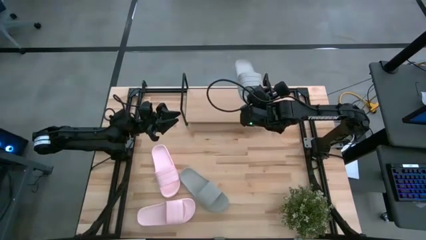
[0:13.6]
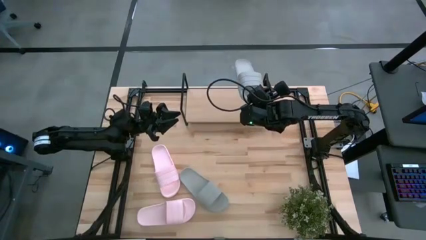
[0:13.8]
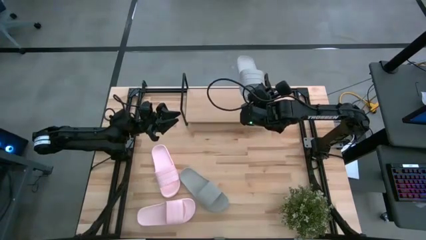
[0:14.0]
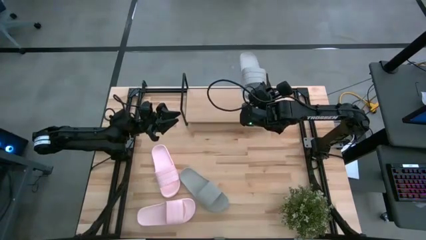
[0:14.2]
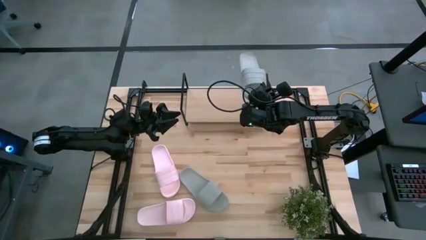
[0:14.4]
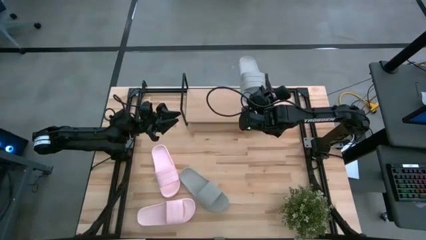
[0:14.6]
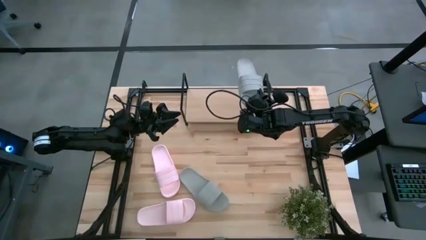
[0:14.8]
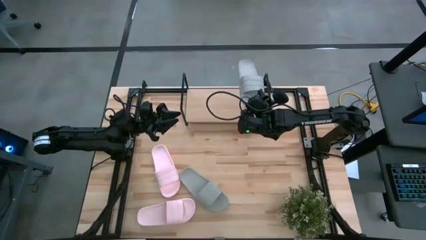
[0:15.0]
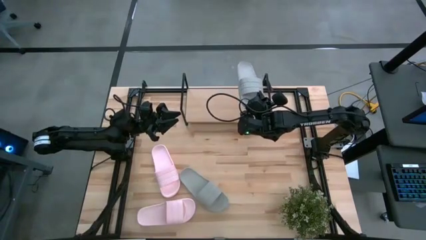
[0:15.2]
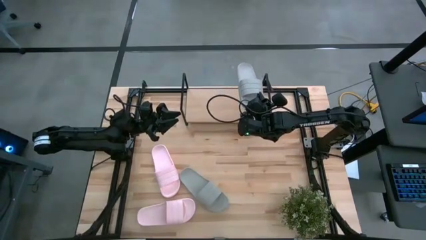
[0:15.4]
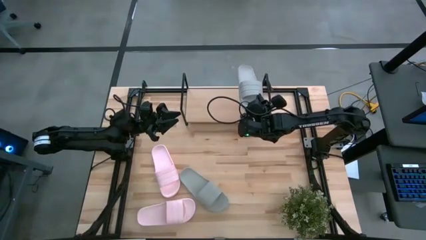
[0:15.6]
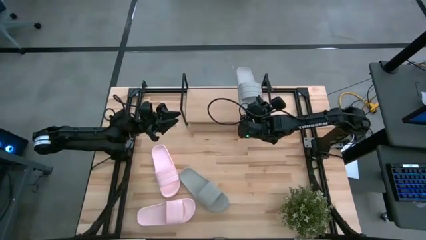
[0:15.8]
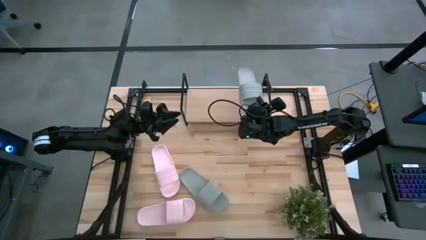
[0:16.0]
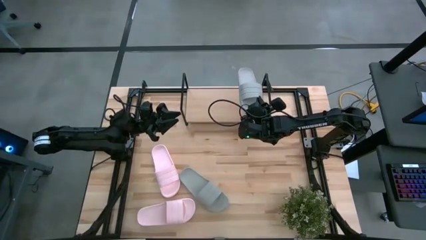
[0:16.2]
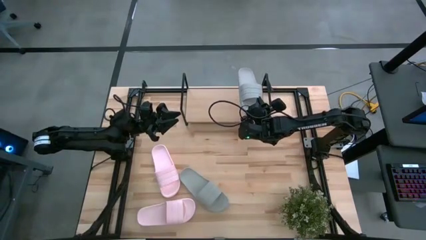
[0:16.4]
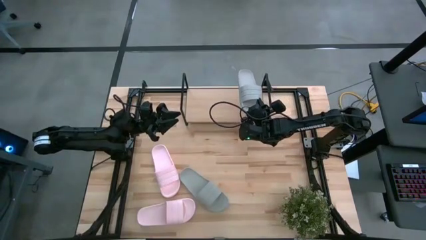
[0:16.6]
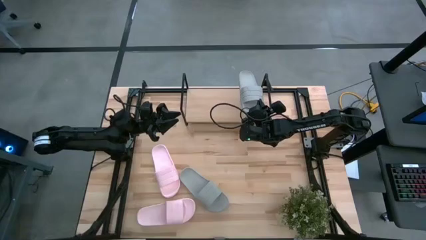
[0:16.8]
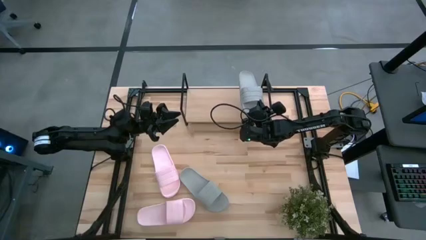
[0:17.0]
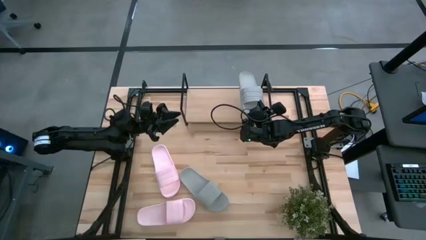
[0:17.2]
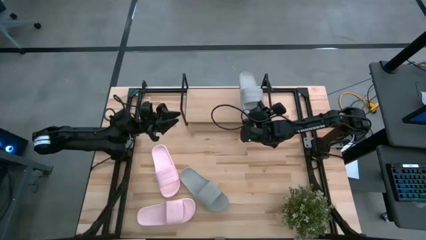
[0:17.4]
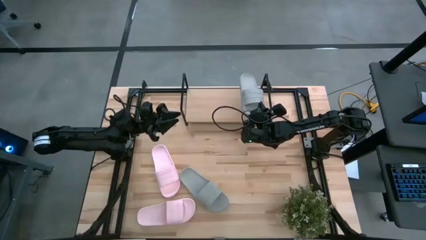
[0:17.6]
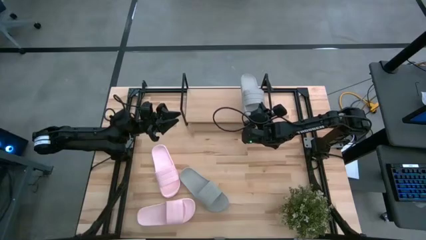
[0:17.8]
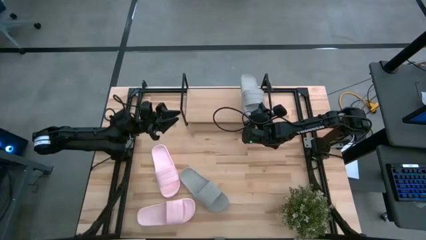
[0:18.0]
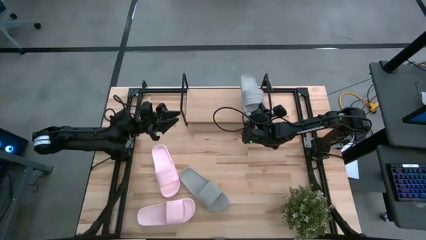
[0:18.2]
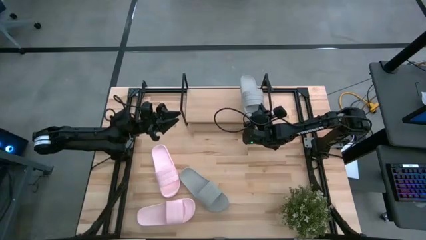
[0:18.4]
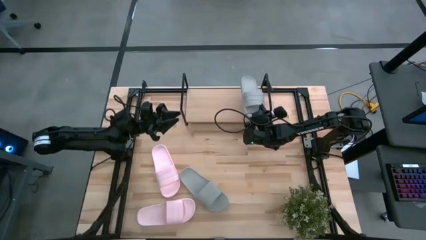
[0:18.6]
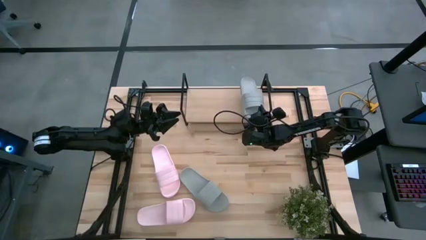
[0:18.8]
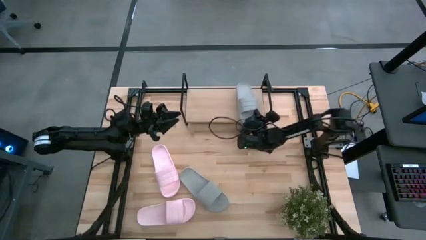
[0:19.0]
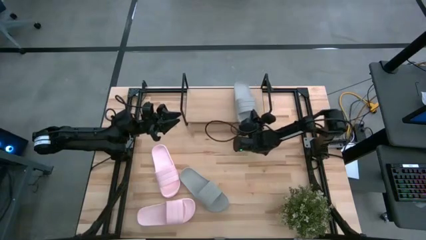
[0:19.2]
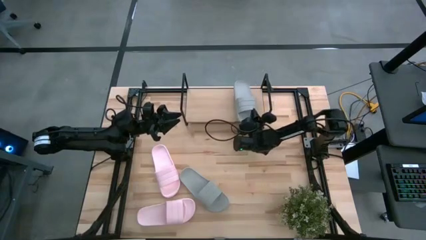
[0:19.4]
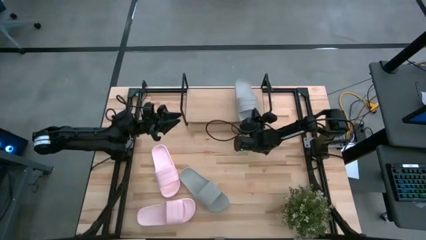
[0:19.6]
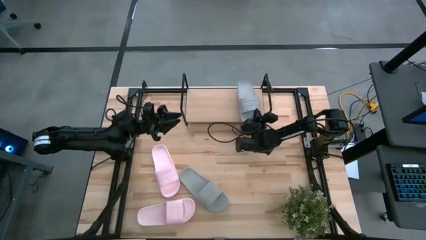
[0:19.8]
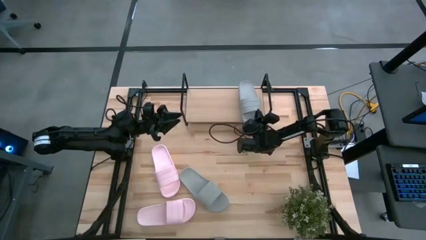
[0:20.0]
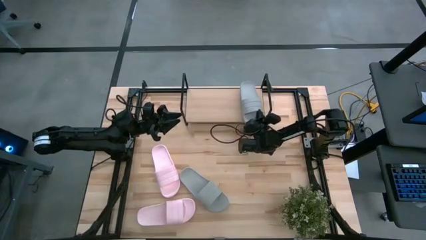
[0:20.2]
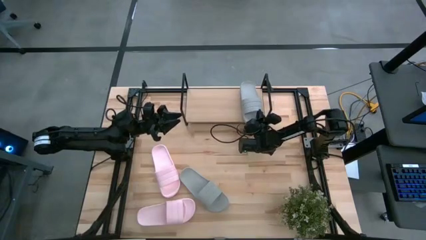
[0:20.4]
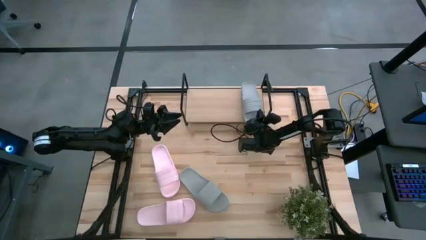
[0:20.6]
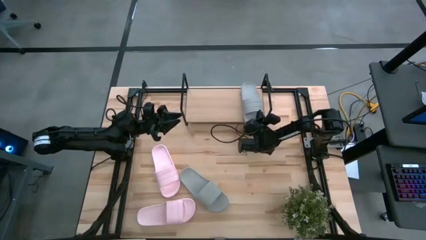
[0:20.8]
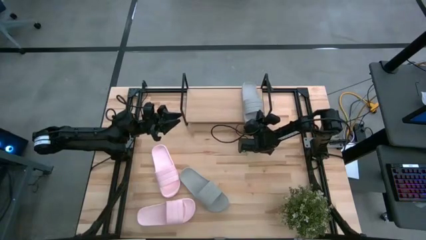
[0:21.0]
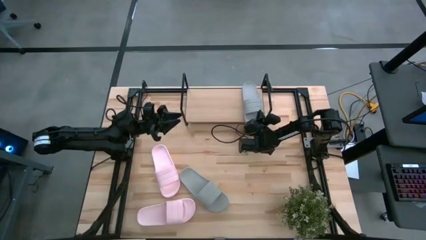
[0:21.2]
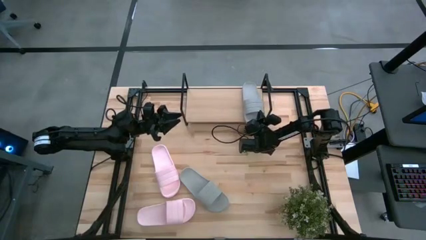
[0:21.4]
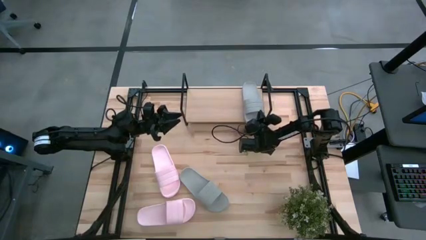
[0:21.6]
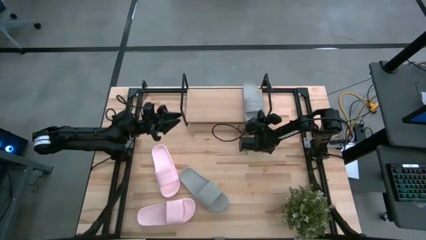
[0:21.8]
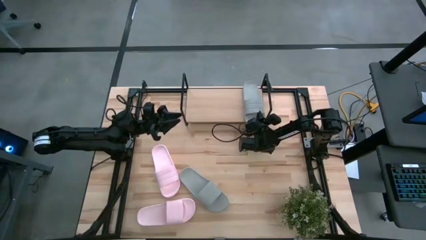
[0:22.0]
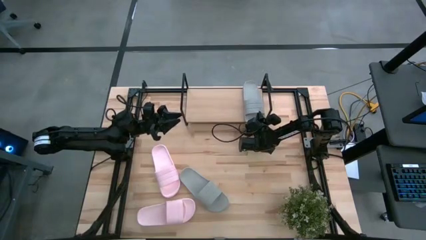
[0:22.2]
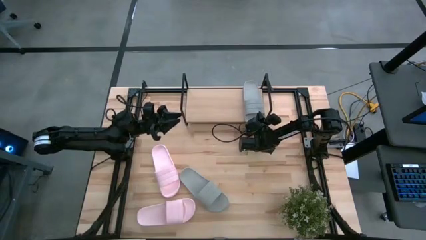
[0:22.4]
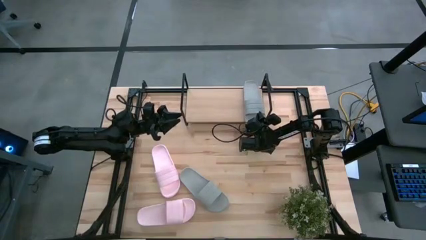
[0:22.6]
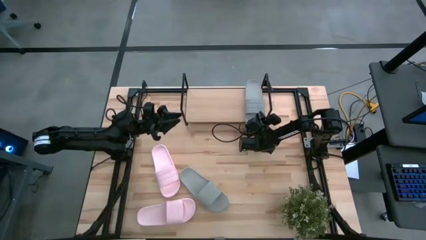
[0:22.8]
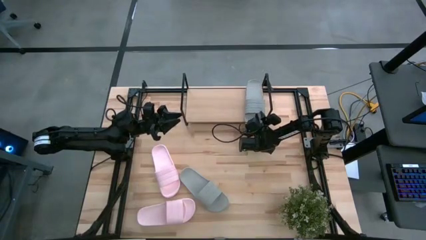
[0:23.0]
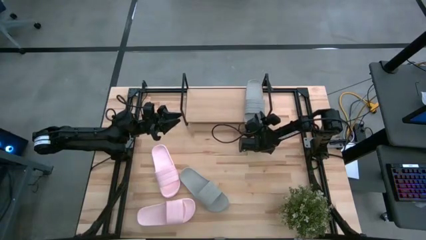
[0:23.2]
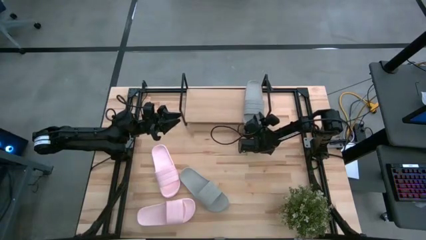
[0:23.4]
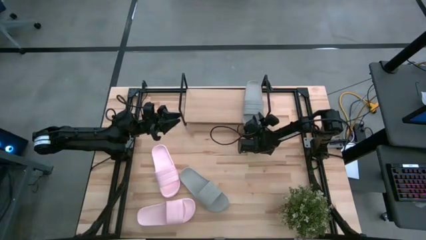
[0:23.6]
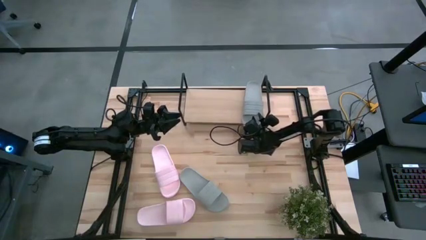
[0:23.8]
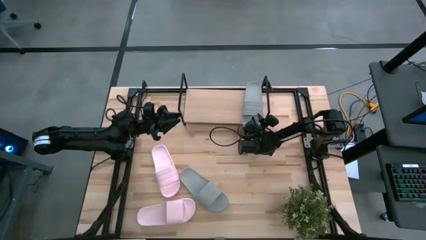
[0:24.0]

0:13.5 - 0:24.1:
Task: Pick and place slides into the shelf
Put the right gray slipper on the shelf
